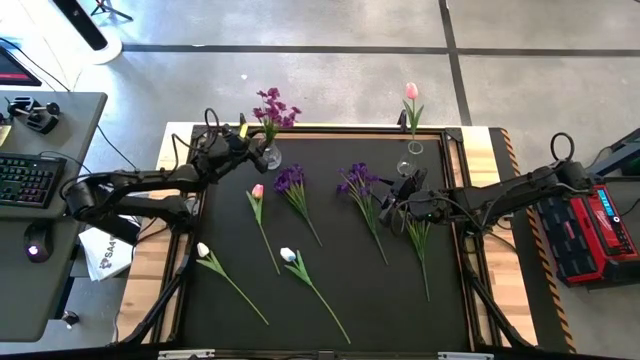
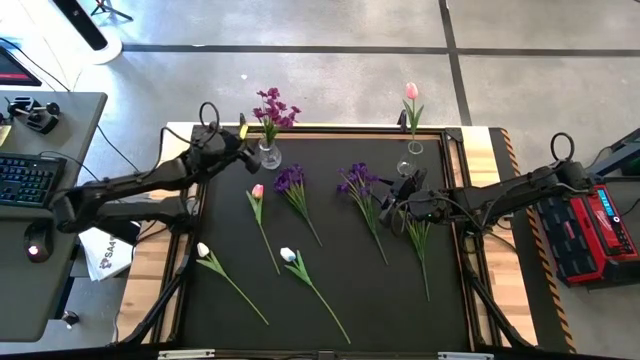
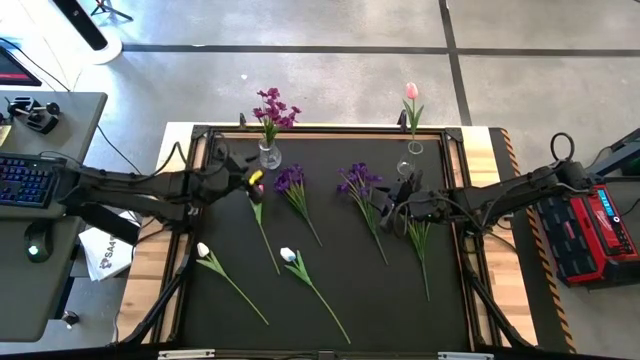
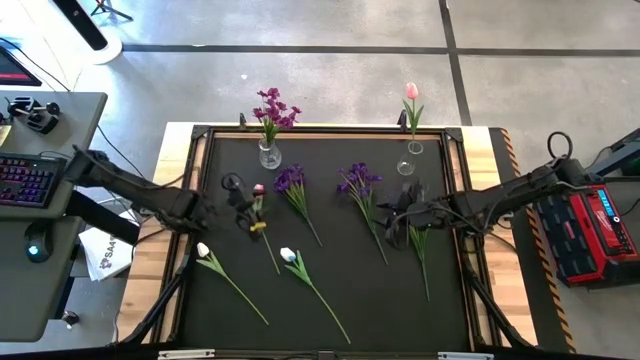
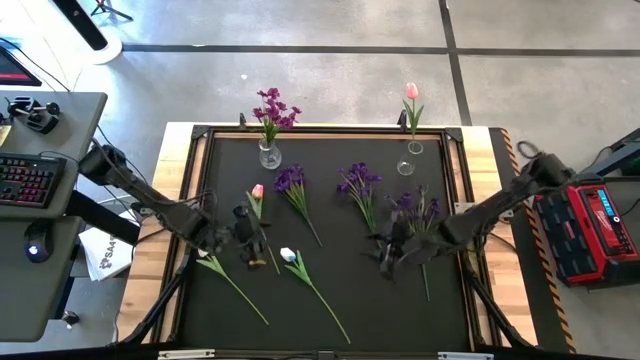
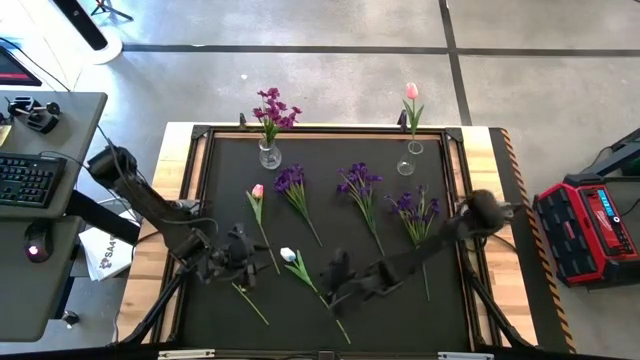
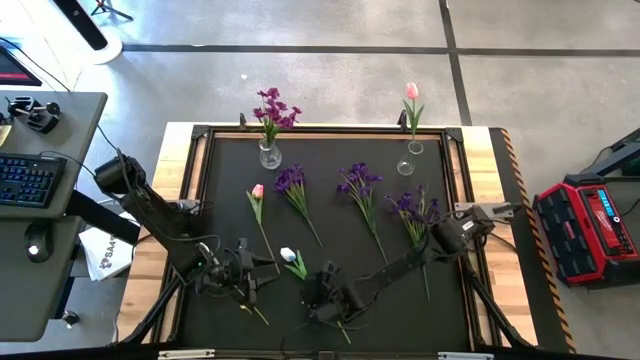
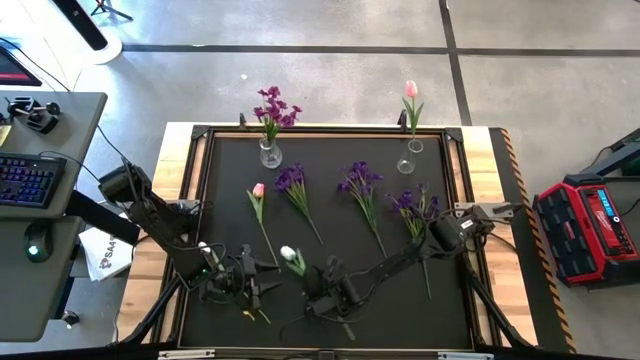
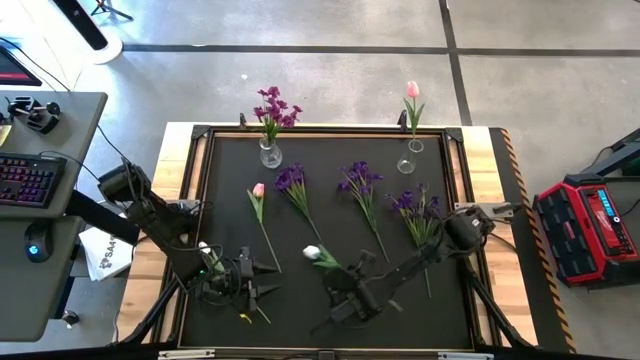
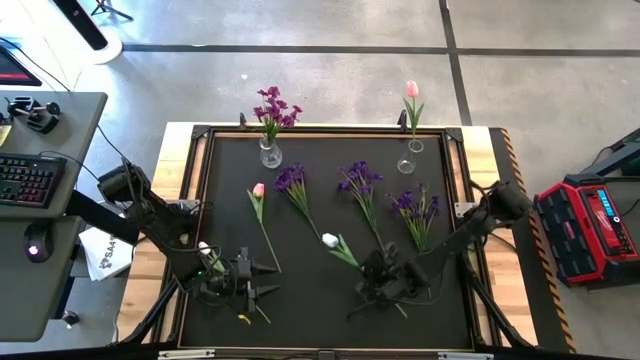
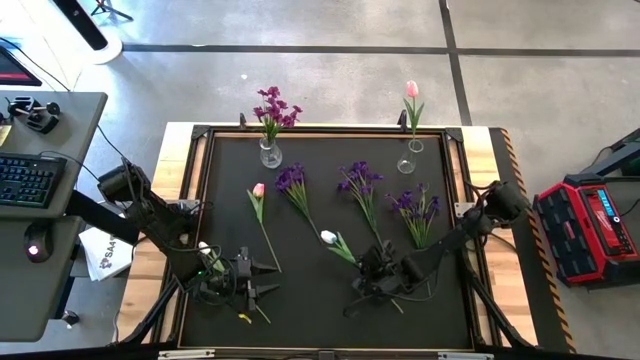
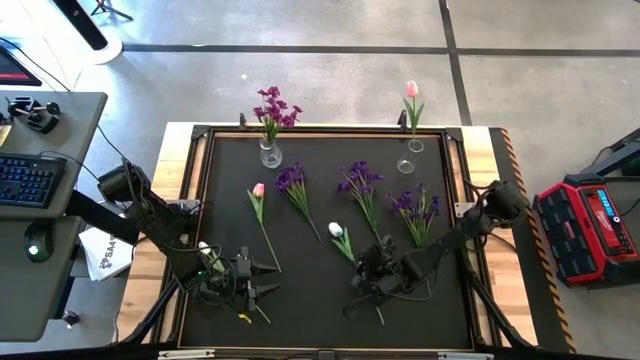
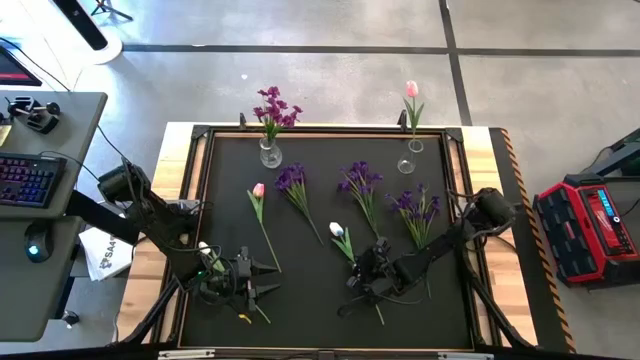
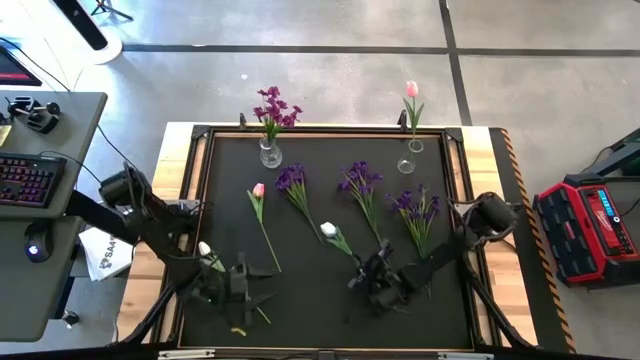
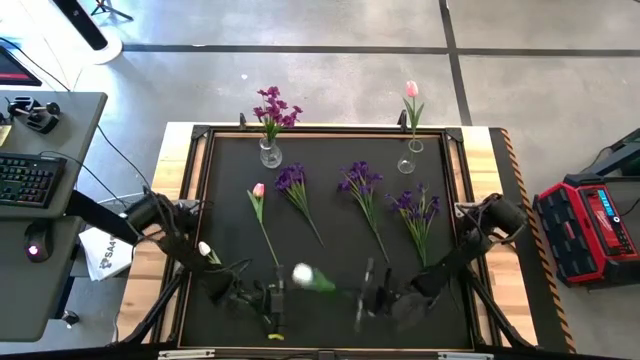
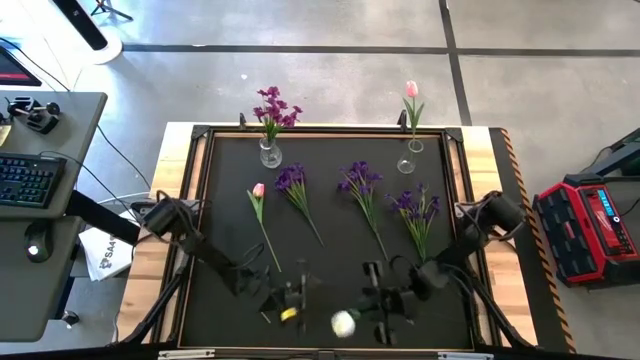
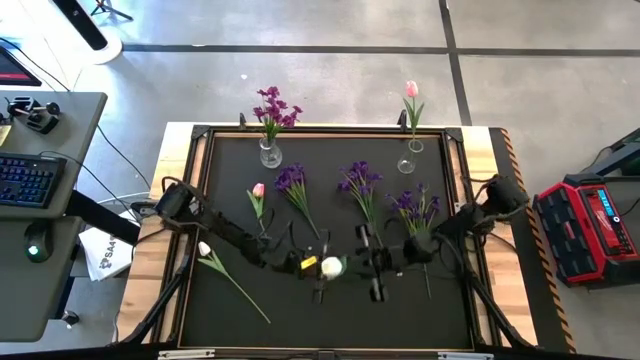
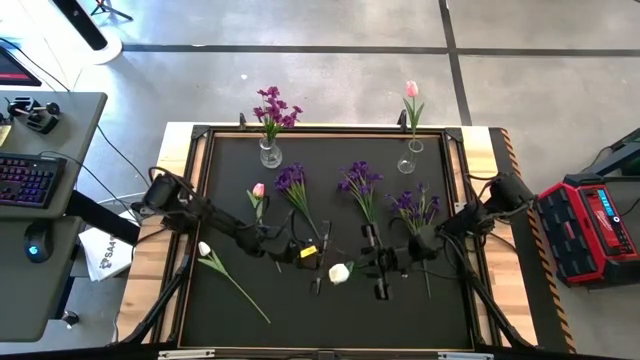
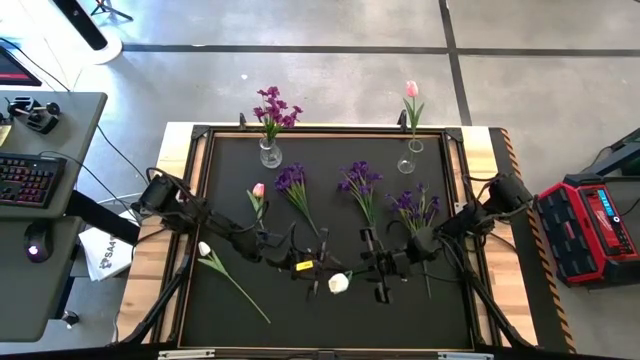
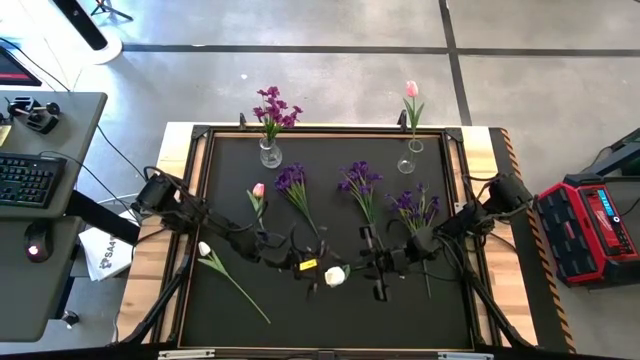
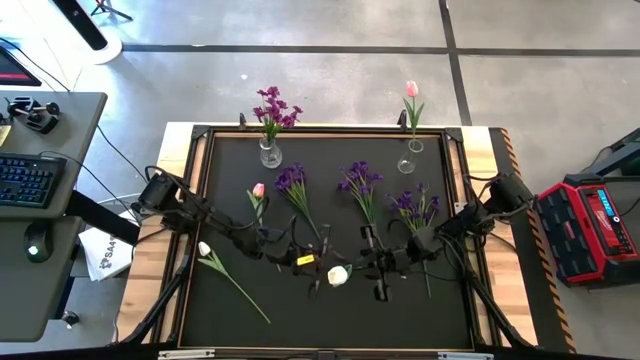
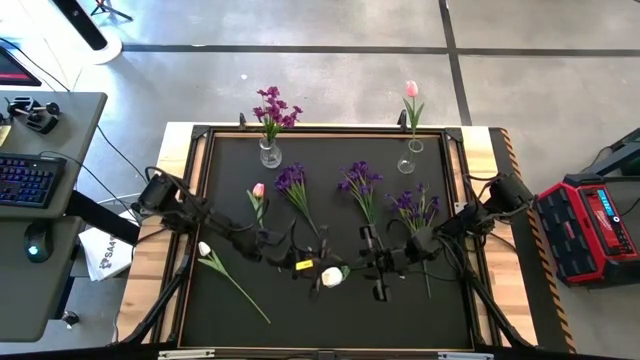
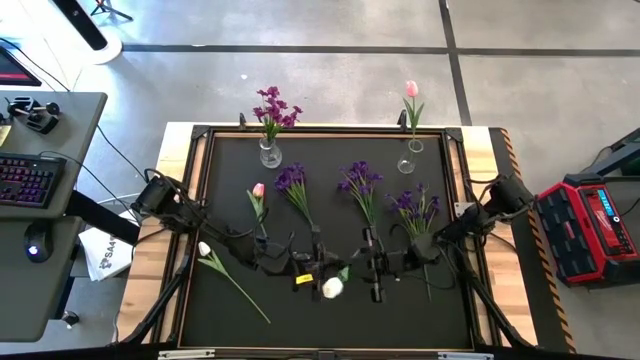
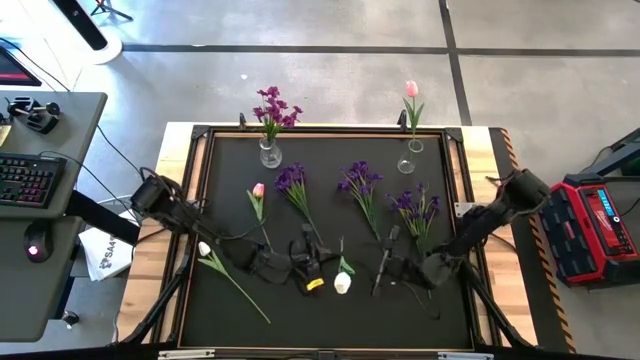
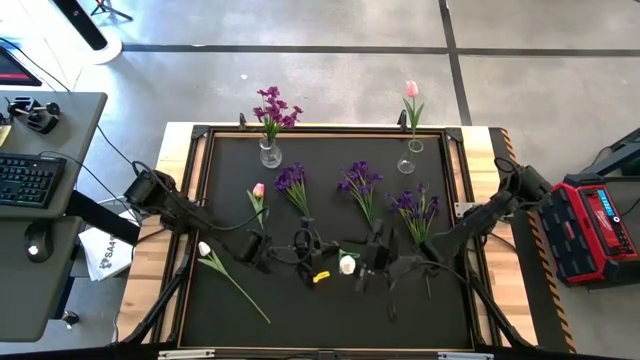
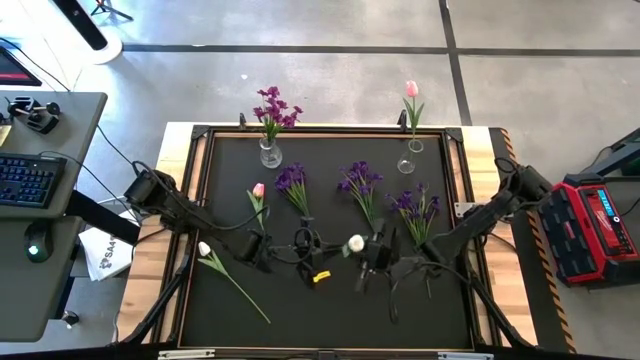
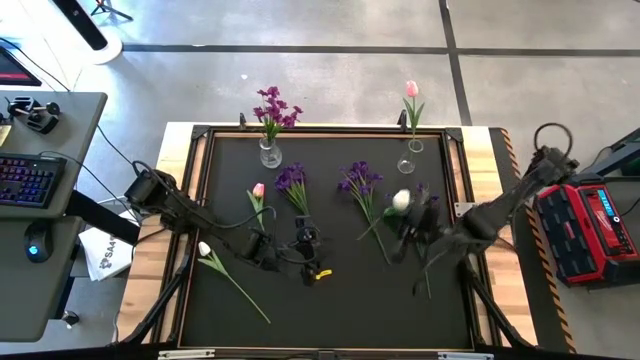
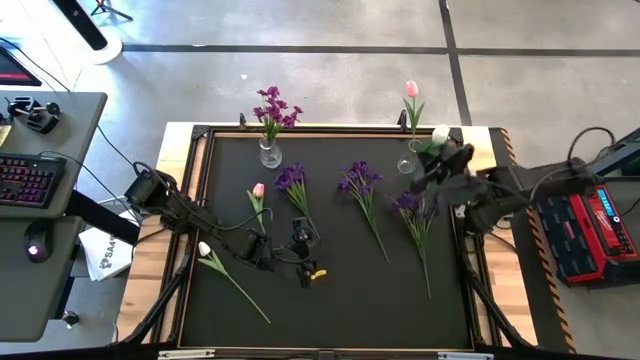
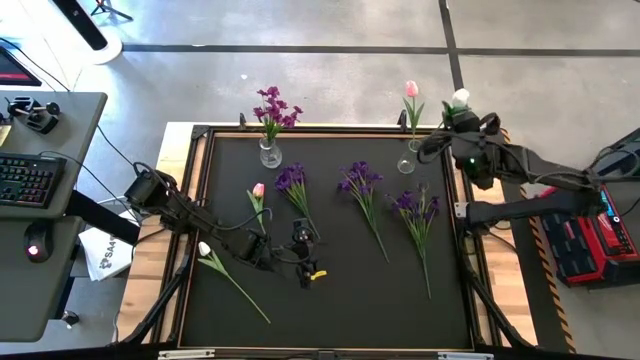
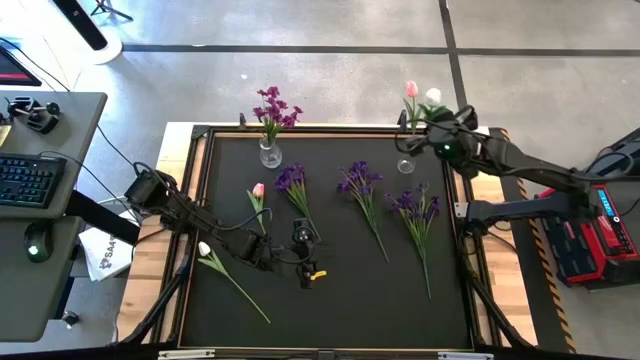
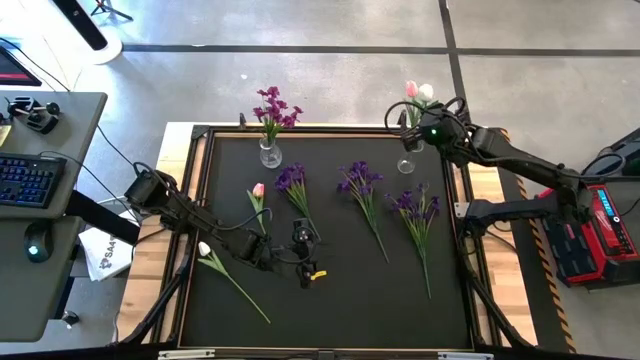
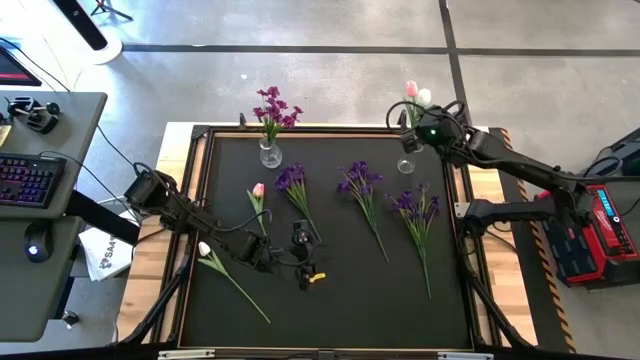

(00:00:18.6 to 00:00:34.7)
Task: Sort flowers into vase by color
Put the right white flowers into the right transparent vase
